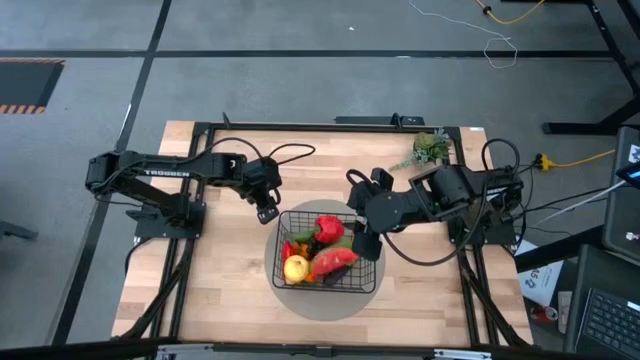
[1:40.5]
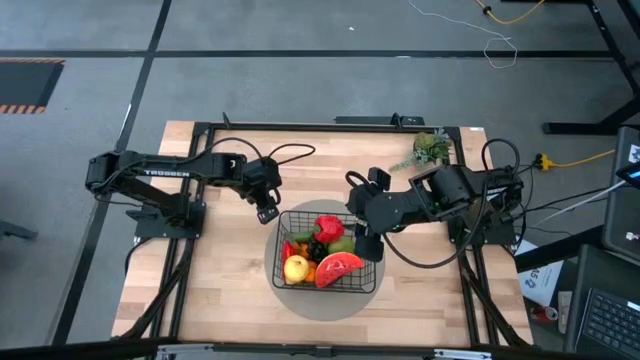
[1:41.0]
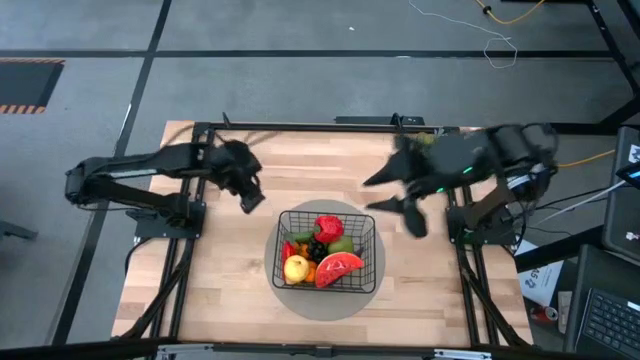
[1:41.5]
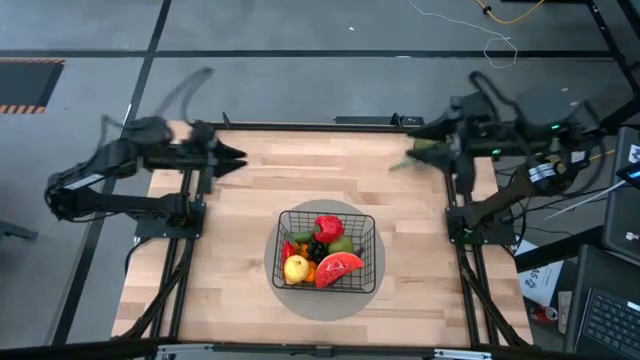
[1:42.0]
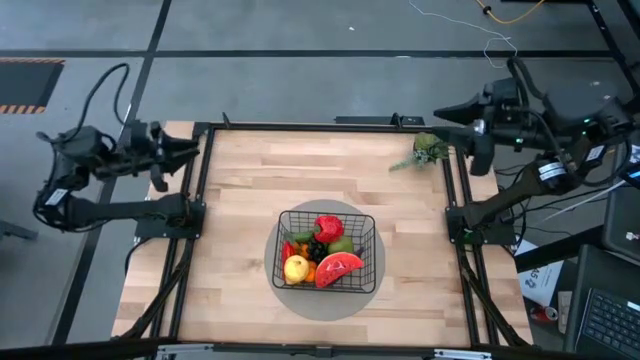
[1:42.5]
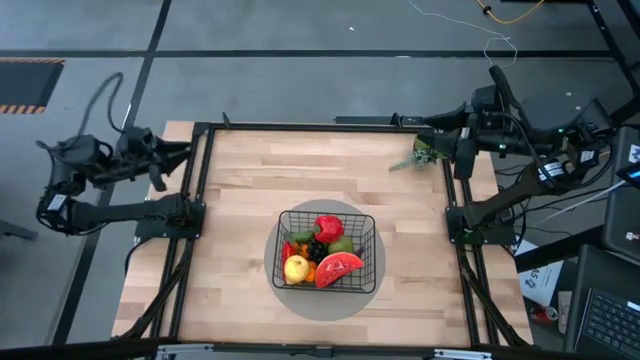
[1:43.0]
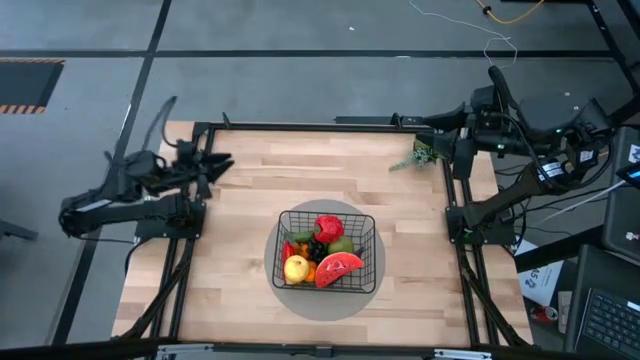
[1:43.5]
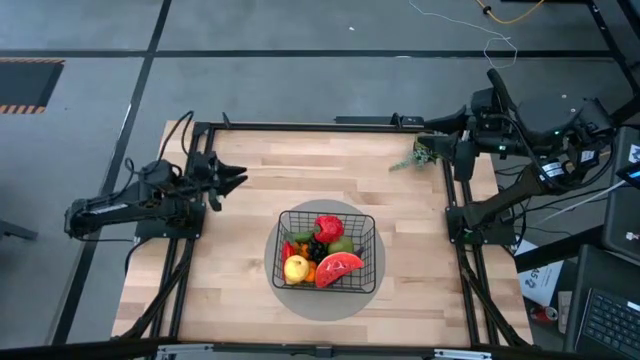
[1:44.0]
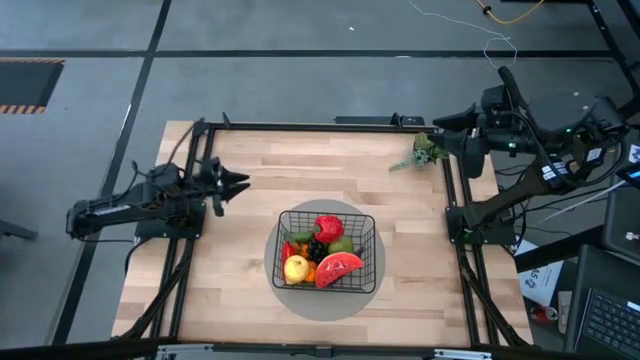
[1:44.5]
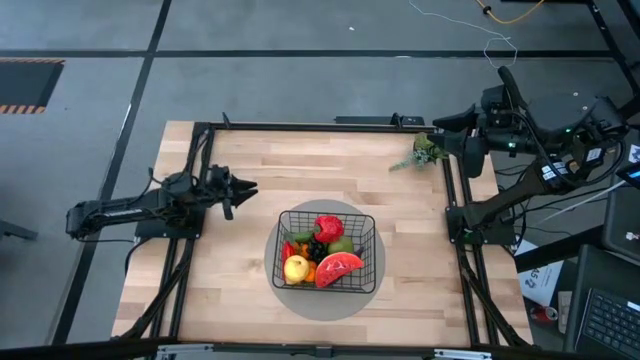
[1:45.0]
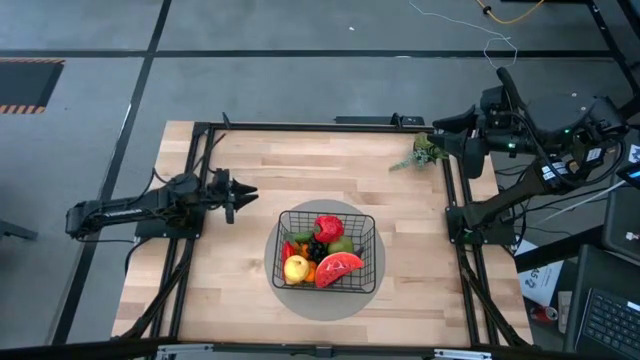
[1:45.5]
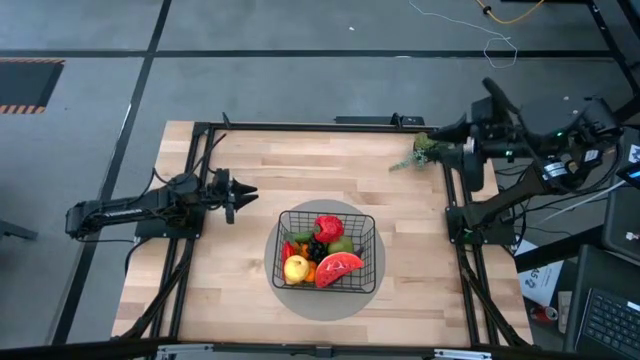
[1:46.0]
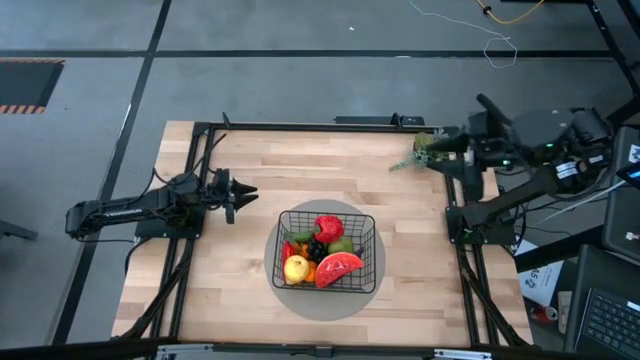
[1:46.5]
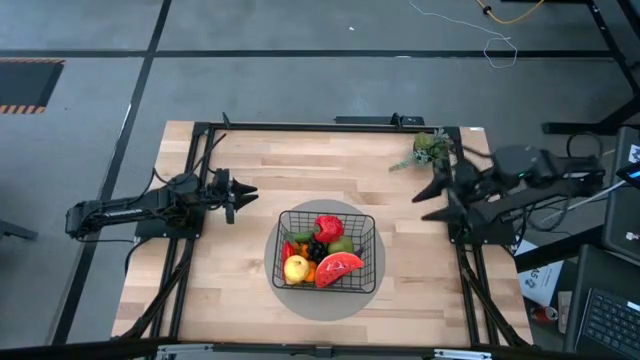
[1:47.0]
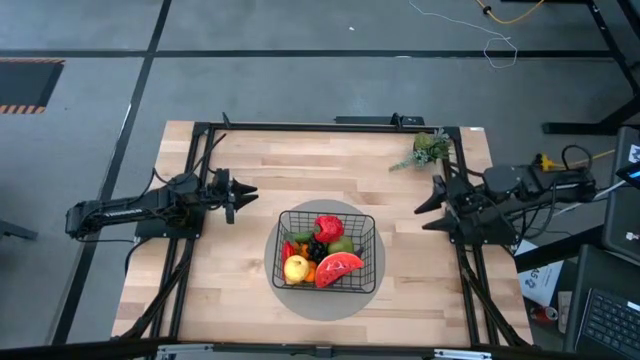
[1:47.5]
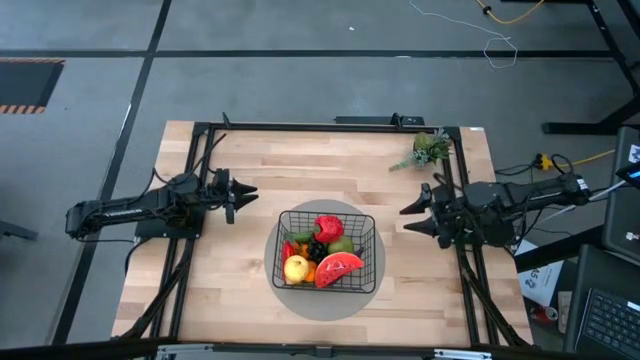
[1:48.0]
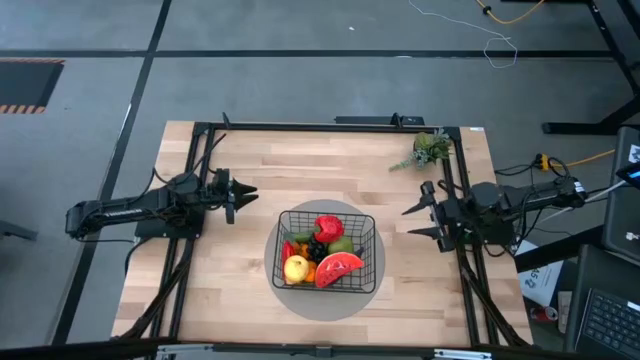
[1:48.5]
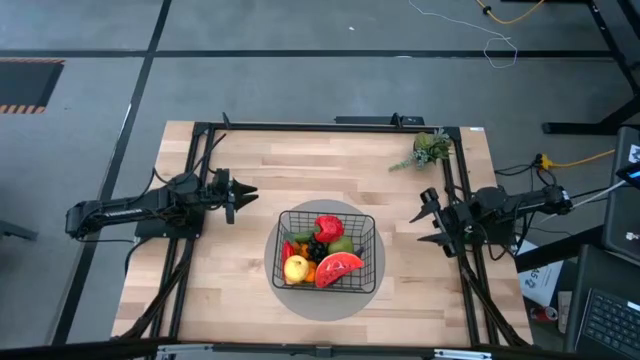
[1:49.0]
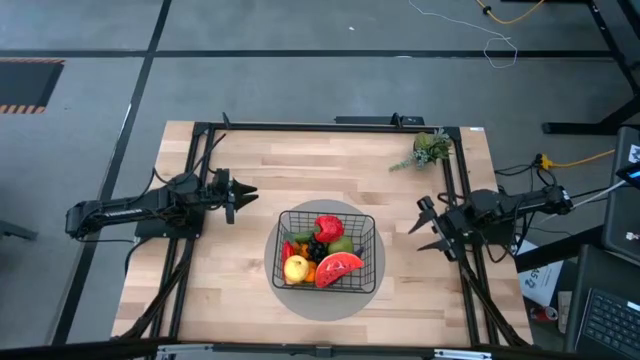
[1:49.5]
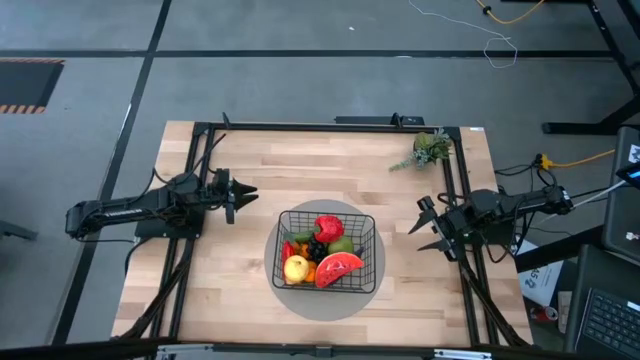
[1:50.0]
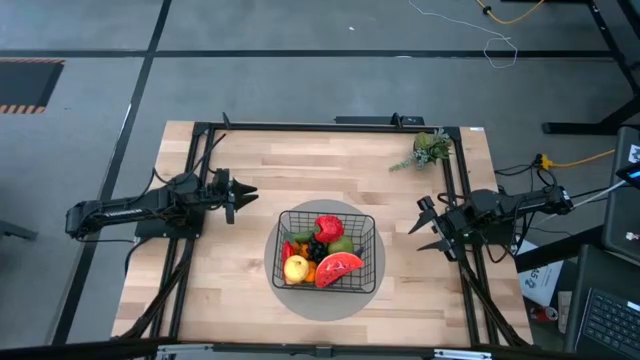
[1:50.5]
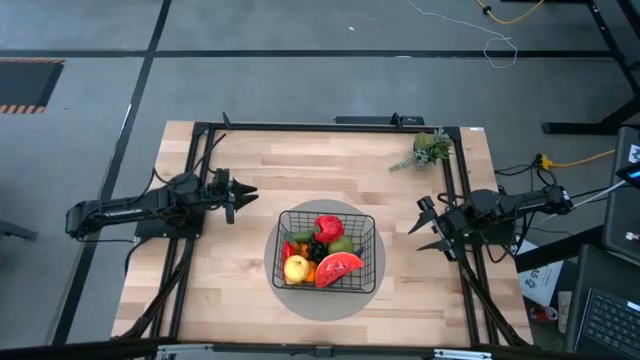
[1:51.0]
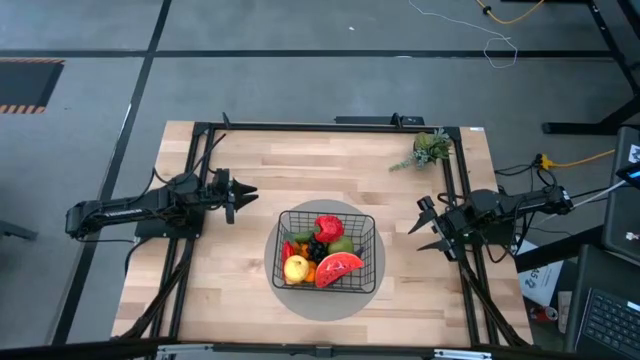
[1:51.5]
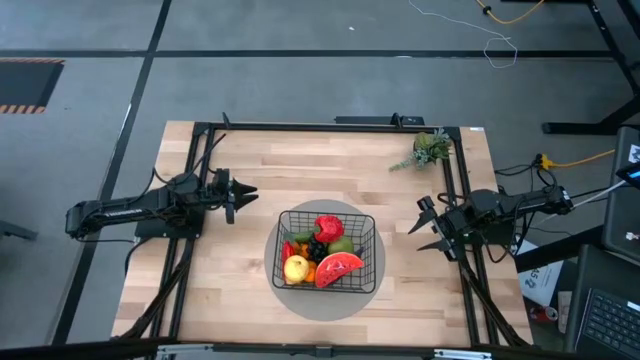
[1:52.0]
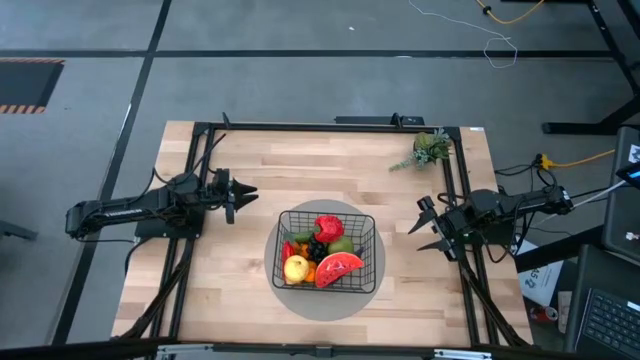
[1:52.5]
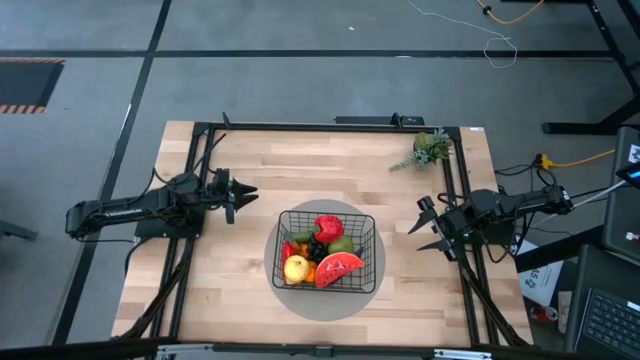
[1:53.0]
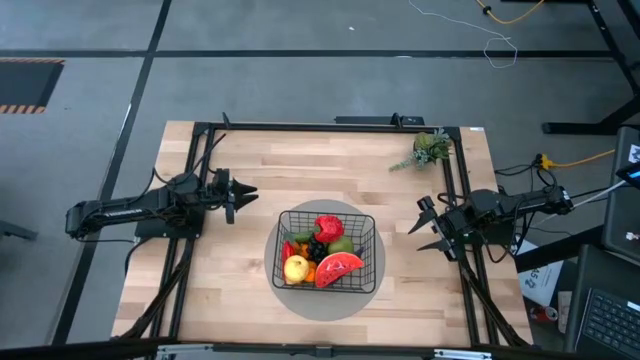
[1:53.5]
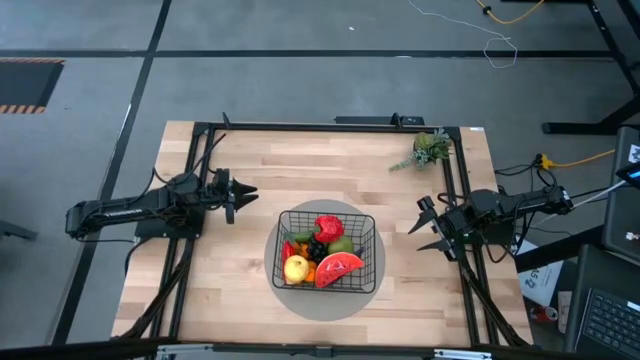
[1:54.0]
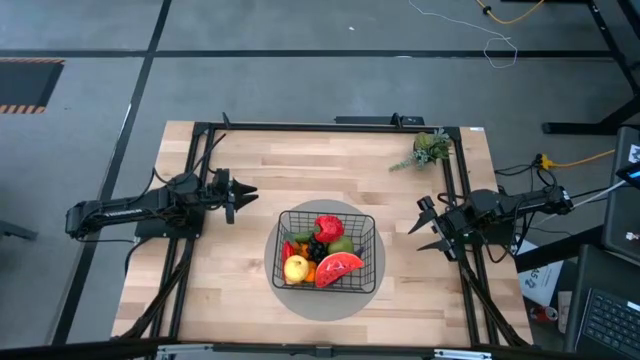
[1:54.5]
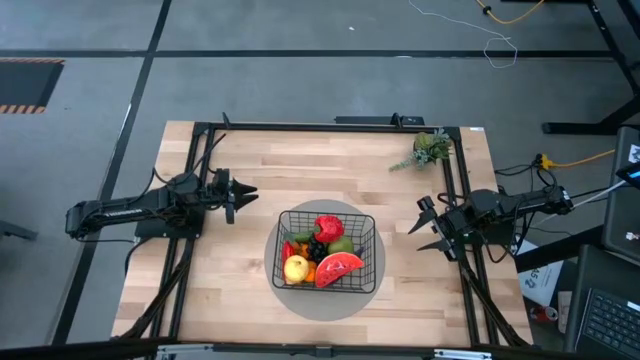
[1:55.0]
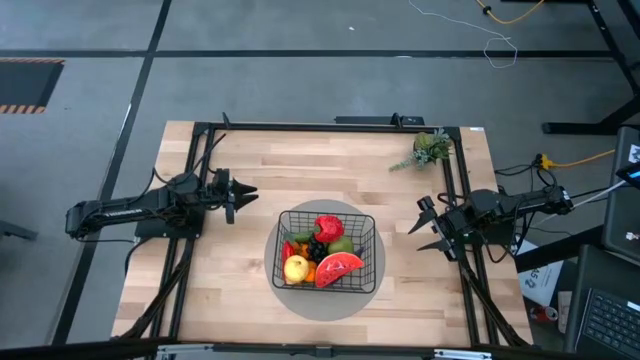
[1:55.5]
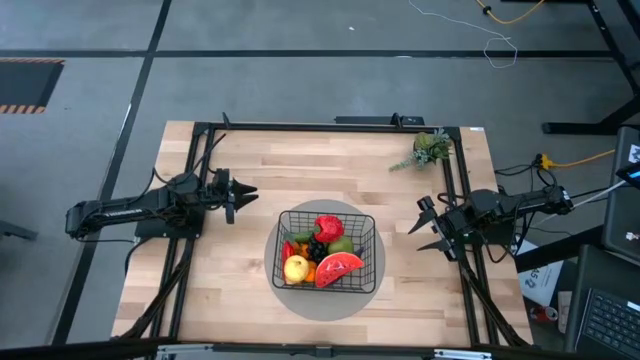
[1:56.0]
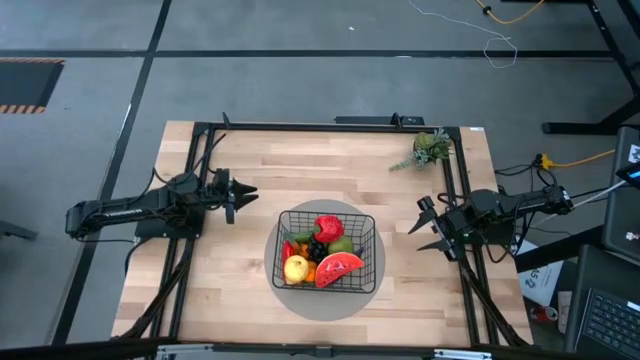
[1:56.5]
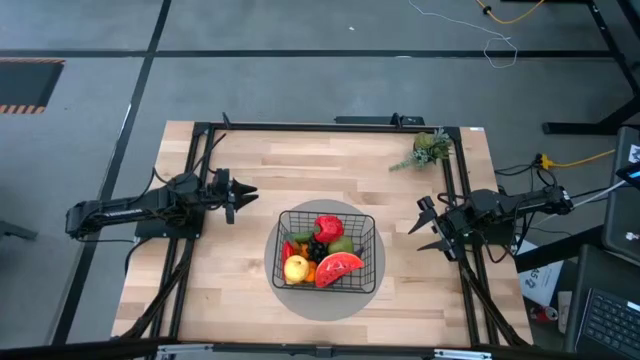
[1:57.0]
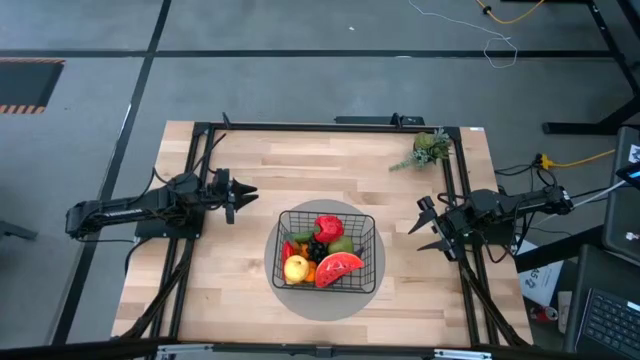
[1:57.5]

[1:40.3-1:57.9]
Task: Build produce basket
Return to Home Position

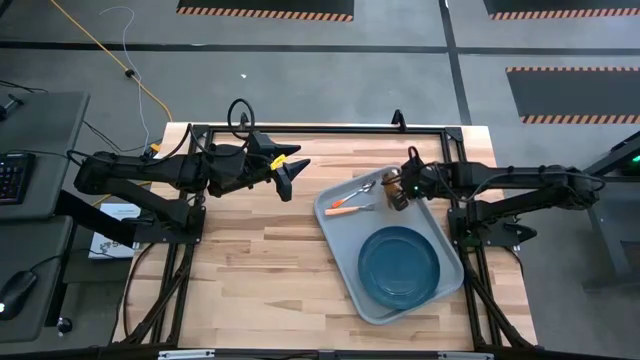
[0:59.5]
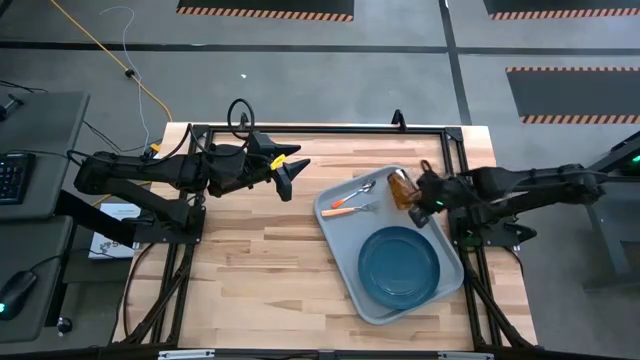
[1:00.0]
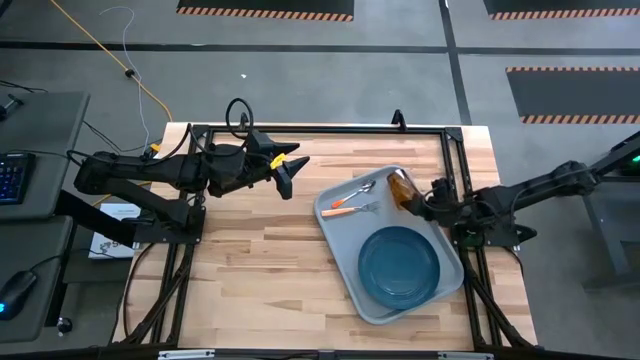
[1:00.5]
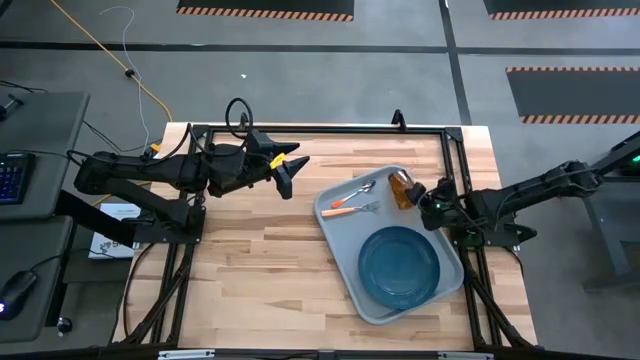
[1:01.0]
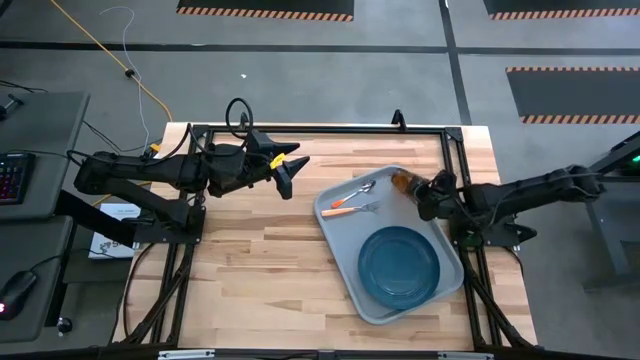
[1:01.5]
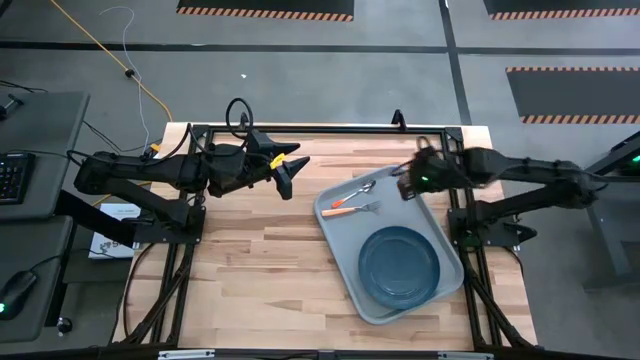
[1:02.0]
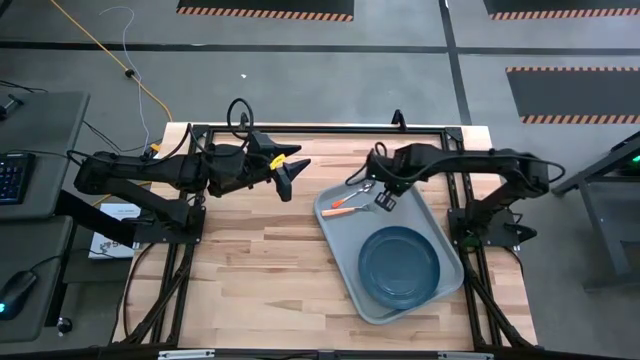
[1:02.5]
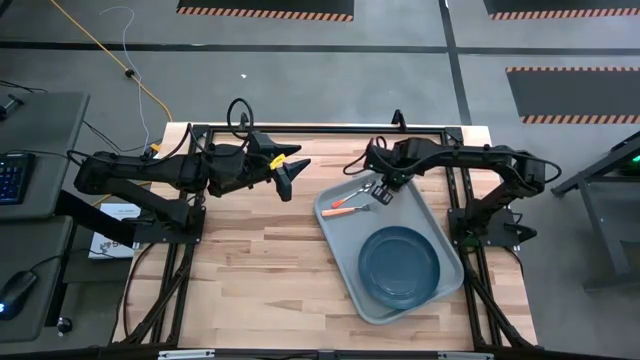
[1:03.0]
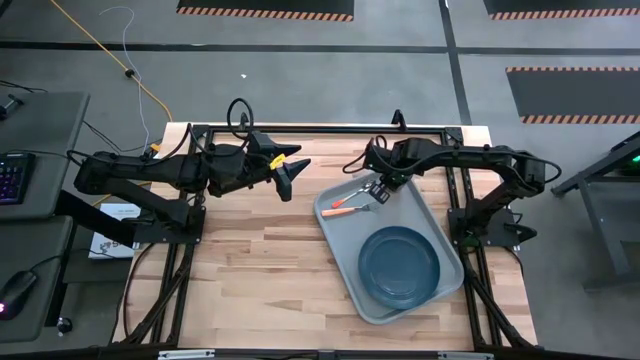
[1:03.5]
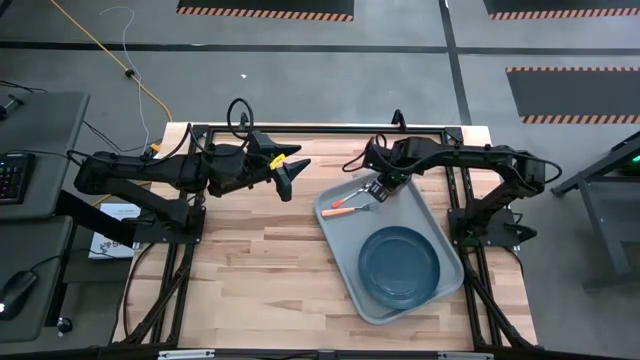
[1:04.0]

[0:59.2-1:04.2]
Task: Pick and place plate/cup/fork/spoon on tray
Adjust the brown glass on the gray serving tray
